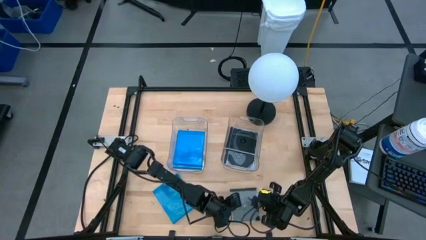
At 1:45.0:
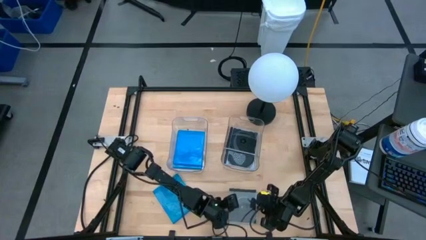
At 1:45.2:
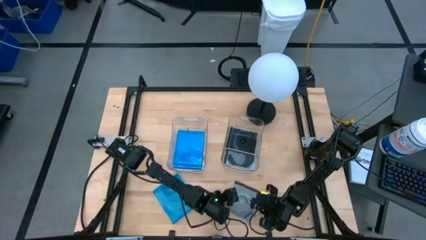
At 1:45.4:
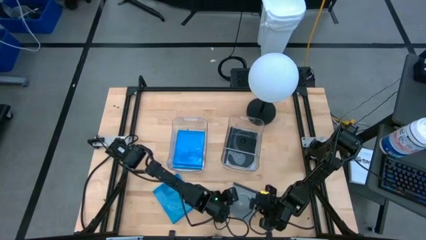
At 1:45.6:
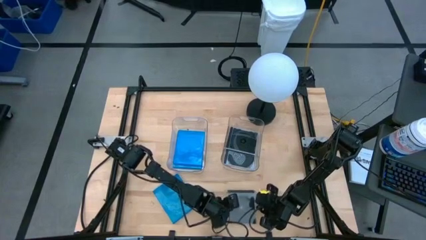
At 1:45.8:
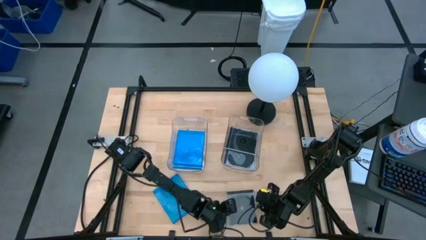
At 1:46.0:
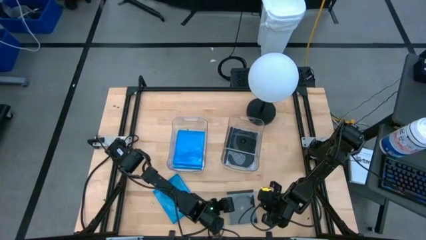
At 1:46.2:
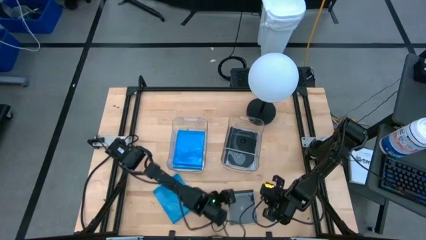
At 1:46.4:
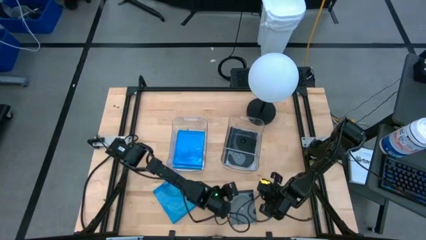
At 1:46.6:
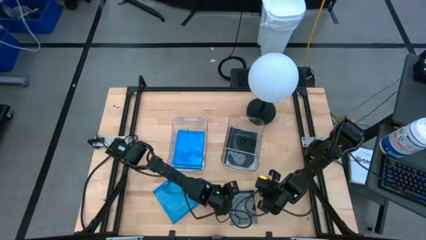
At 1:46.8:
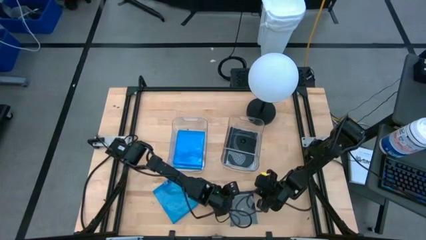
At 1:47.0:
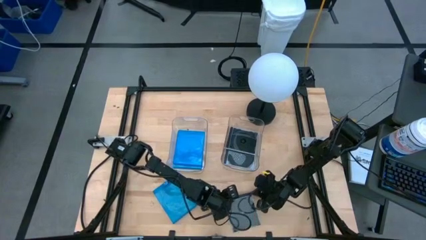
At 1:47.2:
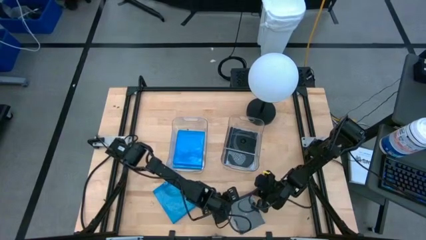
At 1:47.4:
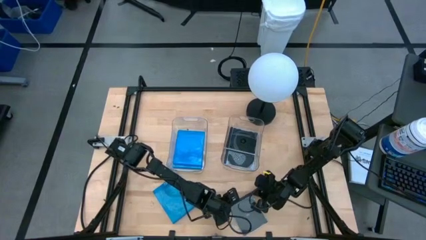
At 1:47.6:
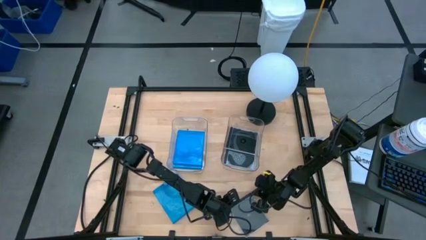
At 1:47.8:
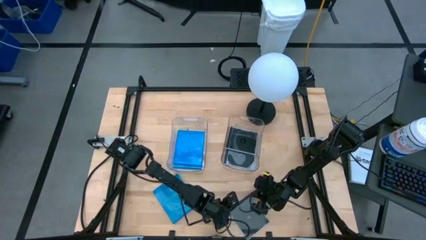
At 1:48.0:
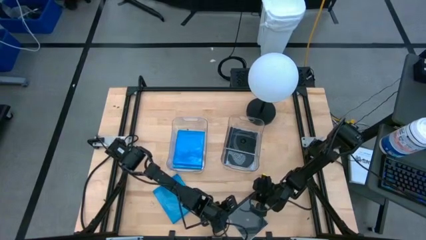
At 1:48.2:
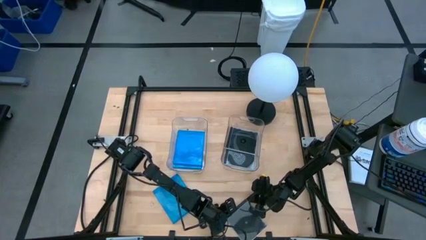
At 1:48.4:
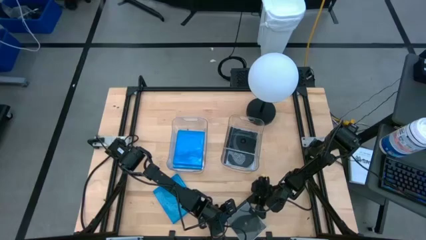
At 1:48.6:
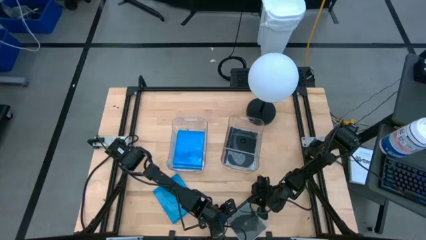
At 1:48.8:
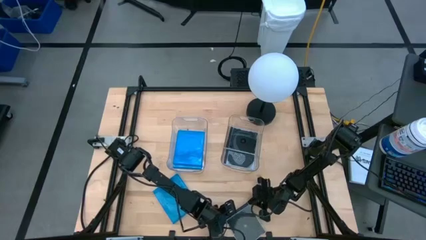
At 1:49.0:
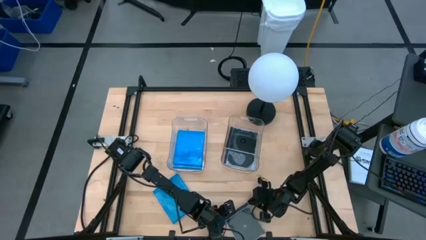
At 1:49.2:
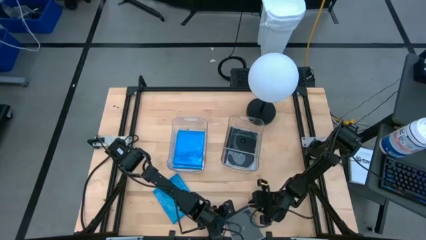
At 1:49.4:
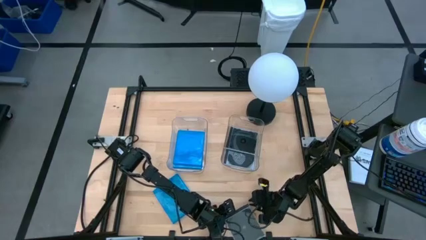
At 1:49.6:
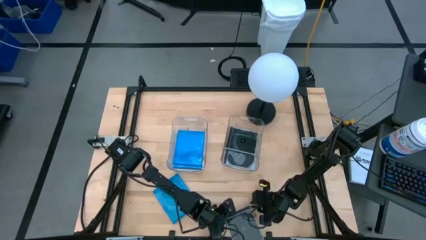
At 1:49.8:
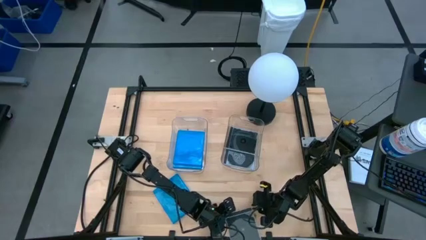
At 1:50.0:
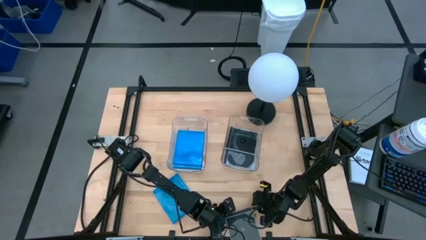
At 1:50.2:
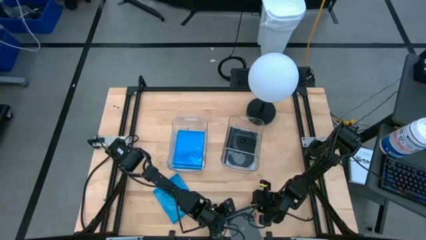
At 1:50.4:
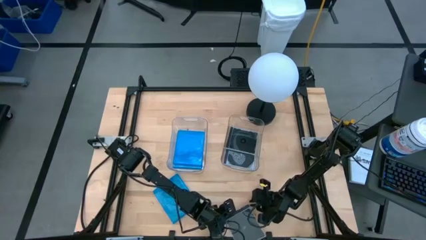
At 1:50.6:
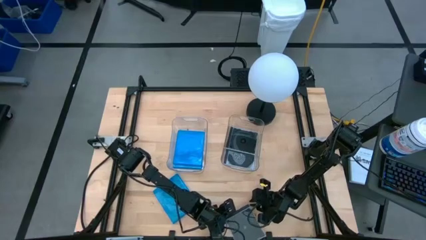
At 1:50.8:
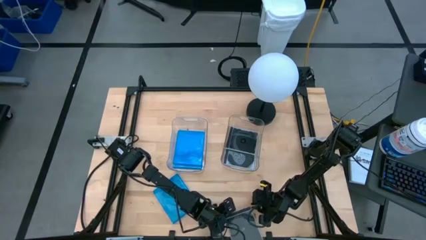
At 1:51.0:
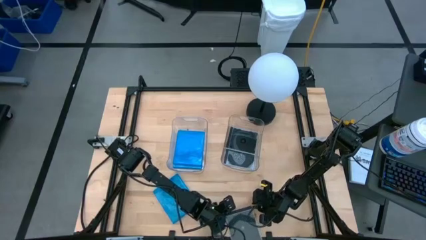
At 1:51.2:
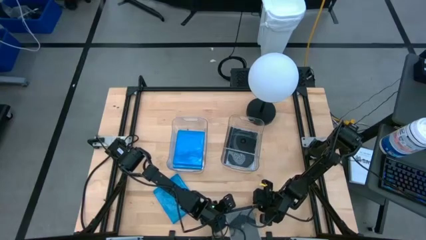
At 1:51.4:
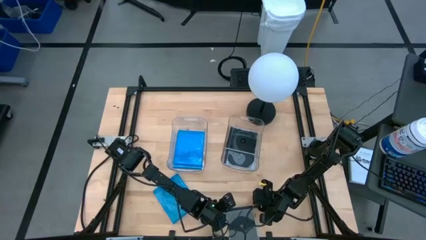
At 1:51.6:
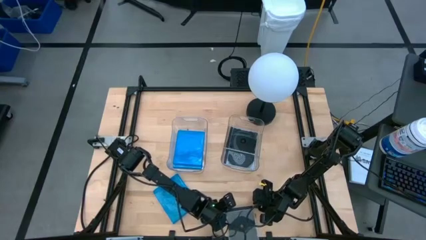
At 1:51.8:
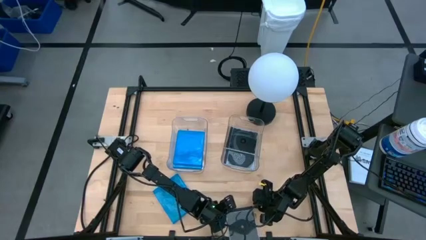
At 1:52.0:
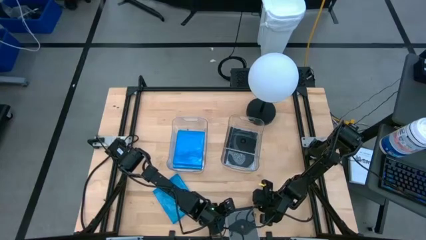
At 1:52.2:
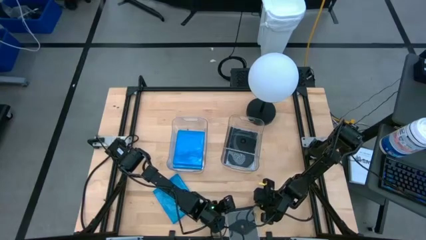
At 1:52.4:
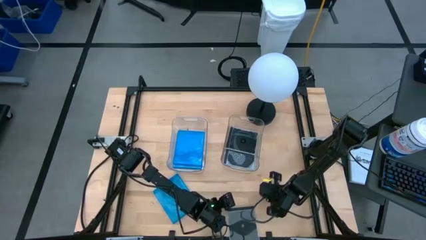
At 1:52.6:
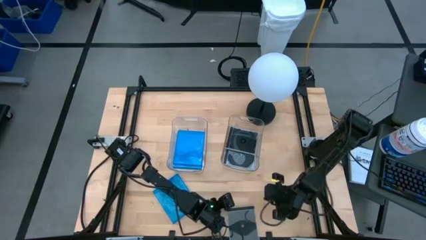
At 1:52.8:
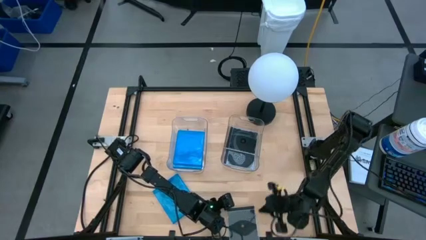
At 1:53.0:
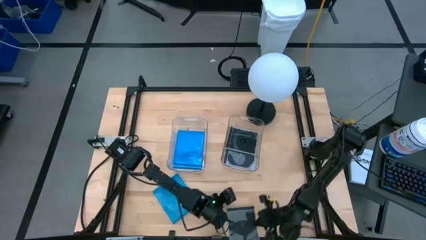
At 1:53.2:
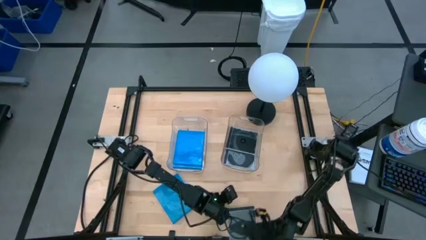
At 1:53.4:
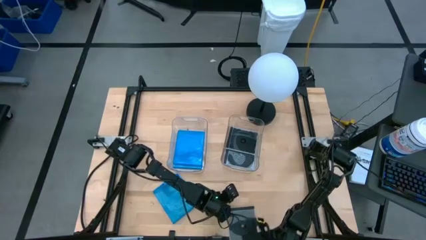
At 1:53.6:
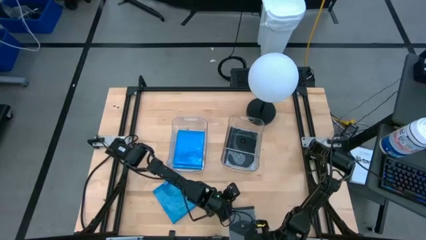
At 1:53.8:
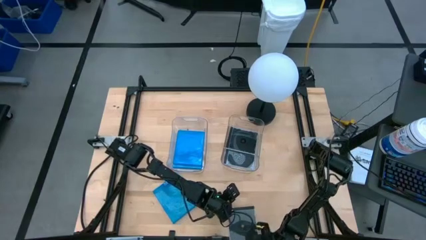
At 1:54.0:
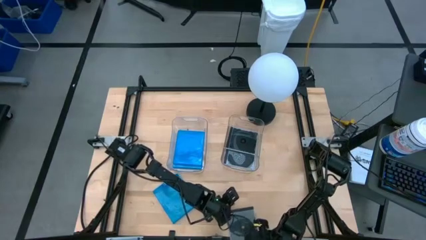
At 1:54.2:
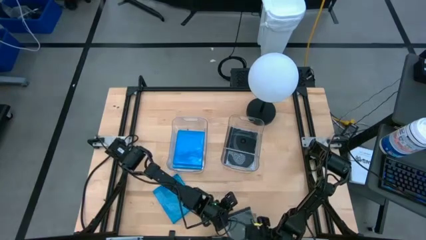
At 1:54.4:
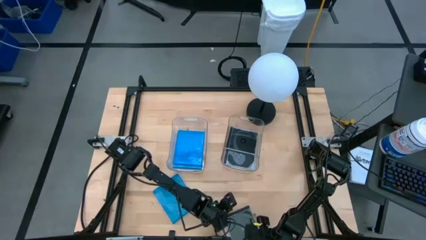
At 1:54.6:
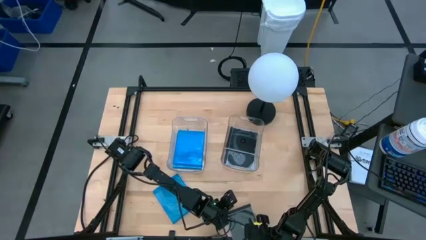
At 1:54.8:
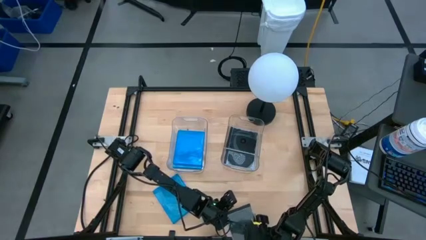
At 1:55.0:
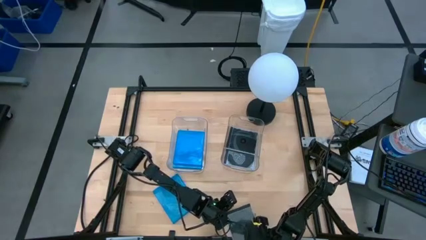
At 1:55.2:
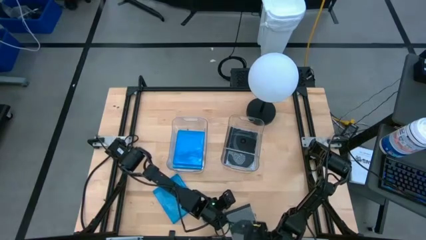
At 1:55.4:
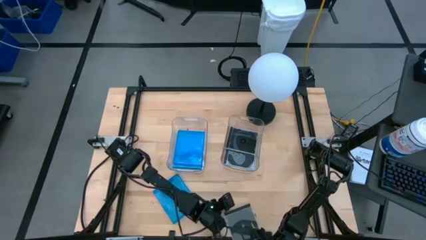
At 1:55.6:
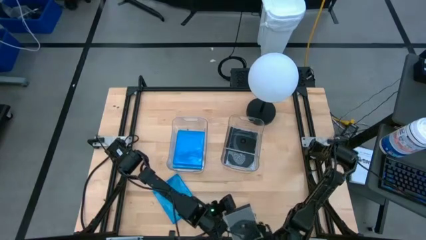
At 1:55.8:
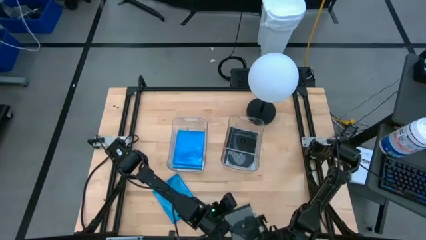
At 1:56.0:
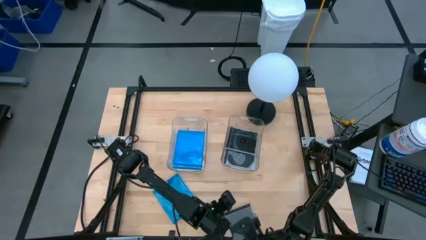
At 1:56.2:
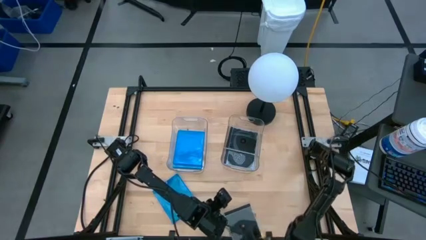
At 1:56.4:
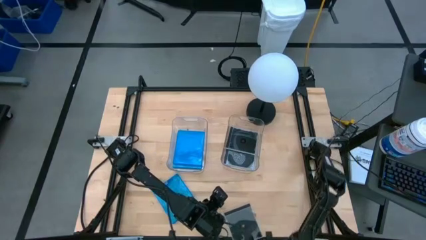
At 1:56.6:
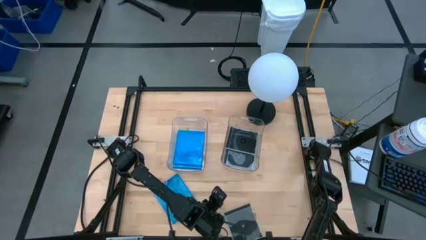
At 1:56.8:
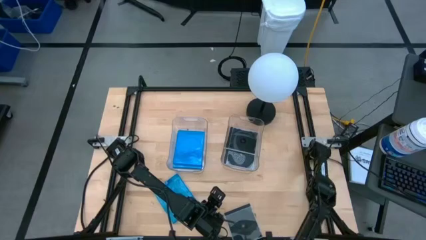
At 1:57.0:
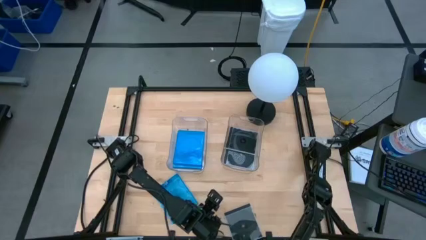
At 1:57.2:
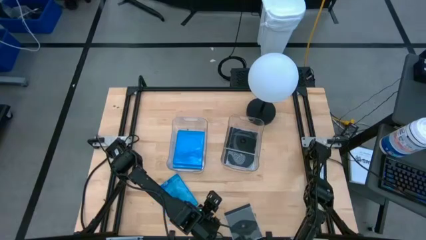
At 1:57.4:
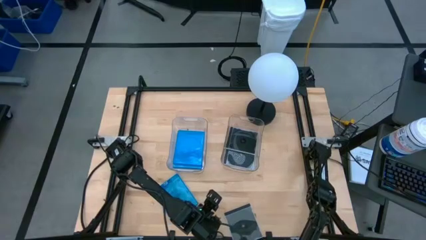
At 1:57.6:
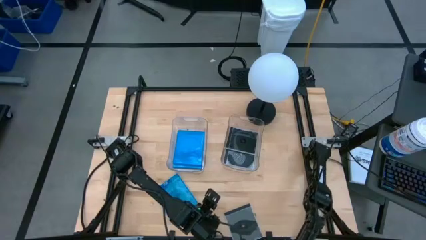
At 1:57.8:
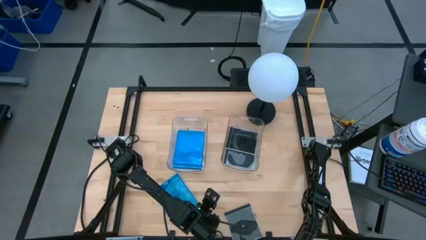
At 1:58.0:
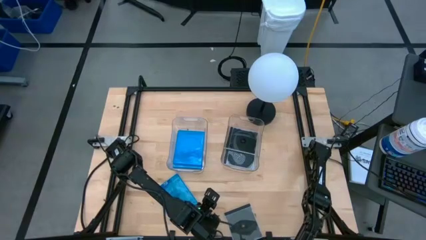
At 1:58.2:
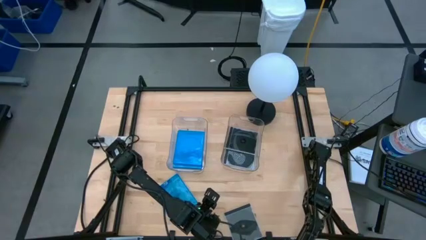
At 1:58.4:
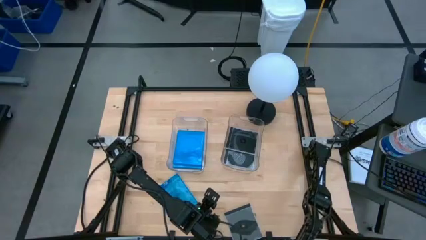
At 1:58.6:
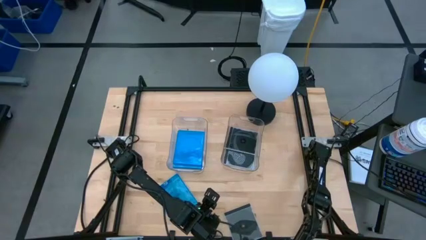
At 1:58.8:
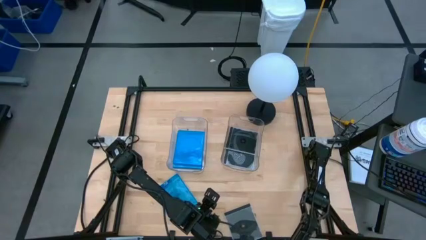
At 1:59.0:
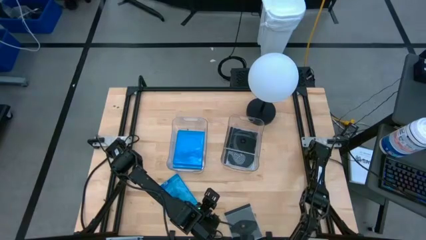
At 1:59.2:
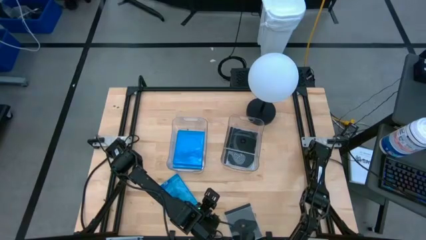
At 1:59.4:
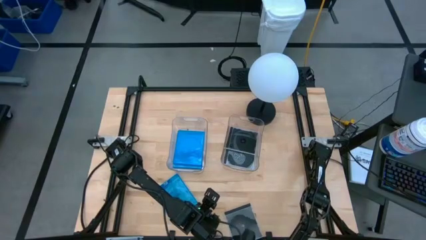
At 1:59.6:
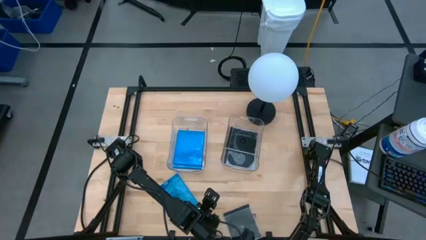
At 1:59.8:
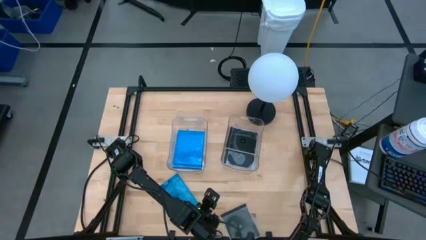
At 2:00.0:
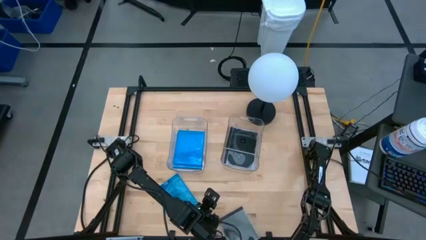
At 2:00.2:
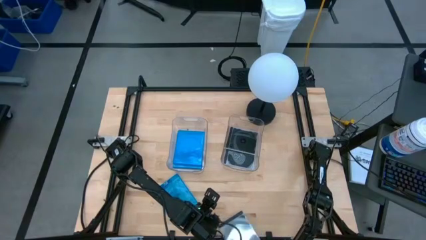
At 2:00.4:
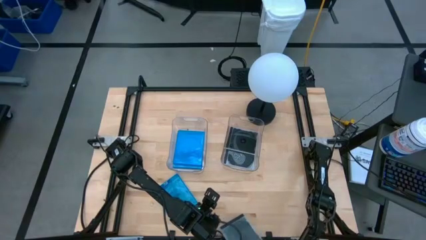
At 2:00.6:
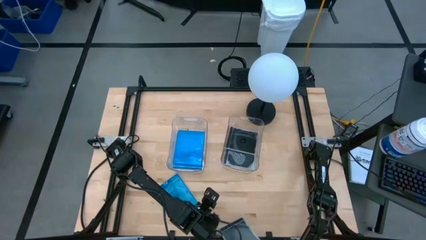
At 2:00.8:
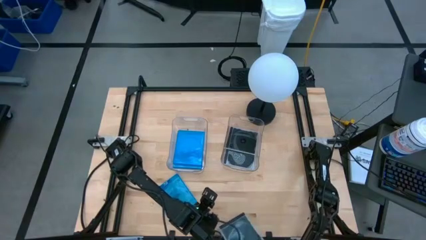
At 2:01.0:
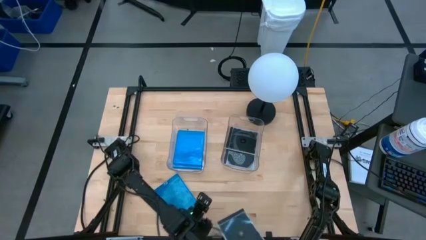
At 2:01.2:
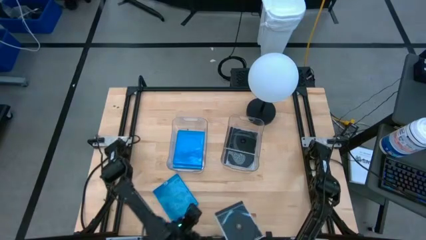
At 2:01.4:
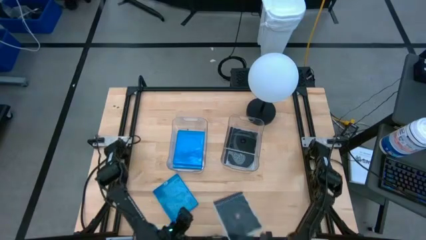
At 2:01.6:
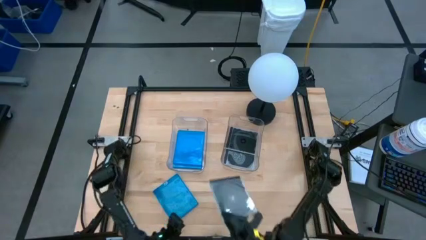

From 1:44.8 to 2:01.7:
Task: Pick & place jewel cases by type
Put the black CD case into the right transparent bin
